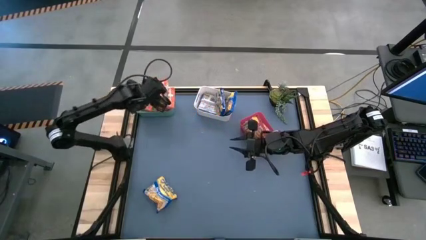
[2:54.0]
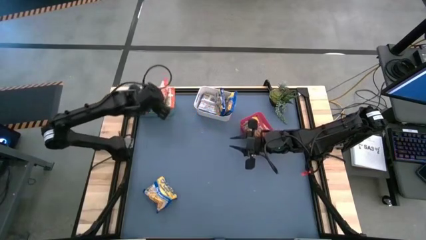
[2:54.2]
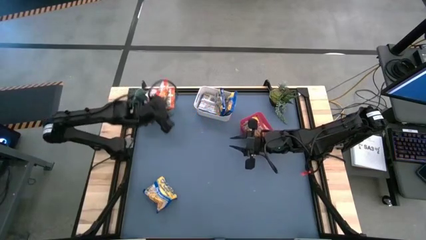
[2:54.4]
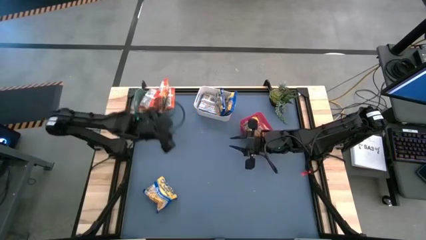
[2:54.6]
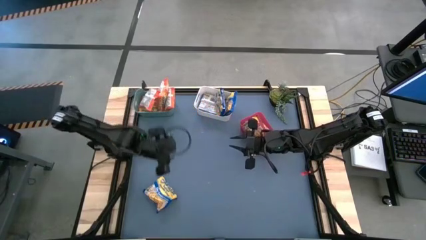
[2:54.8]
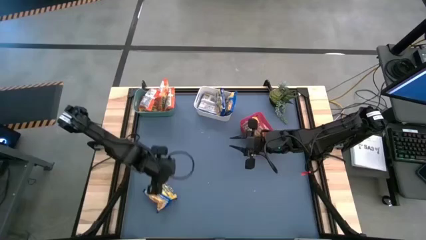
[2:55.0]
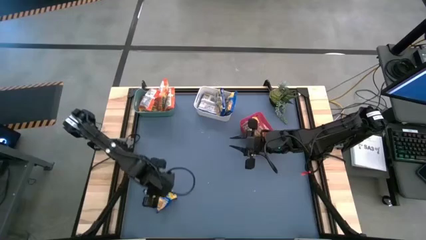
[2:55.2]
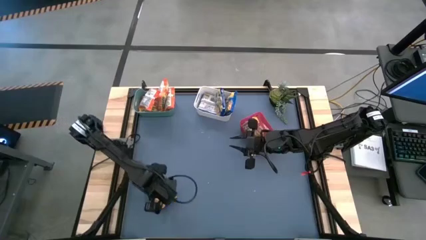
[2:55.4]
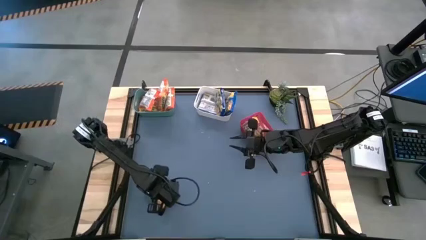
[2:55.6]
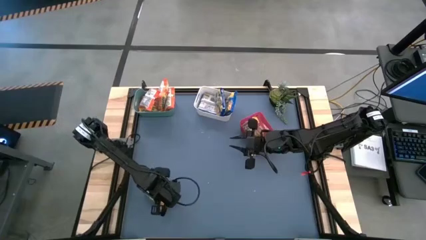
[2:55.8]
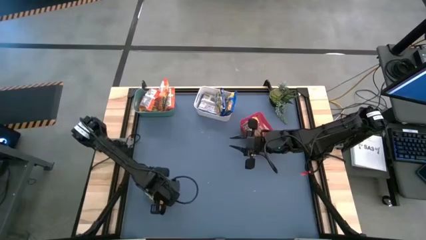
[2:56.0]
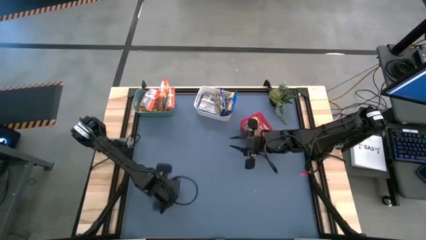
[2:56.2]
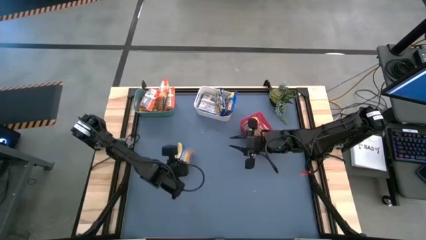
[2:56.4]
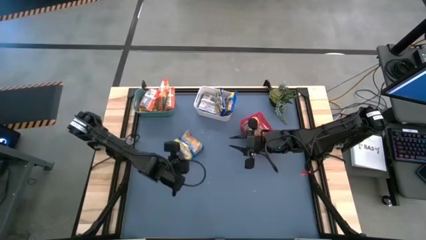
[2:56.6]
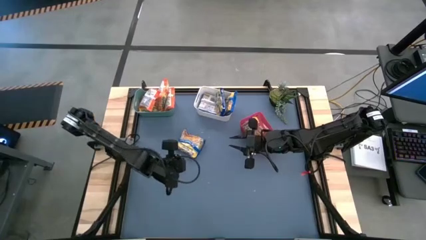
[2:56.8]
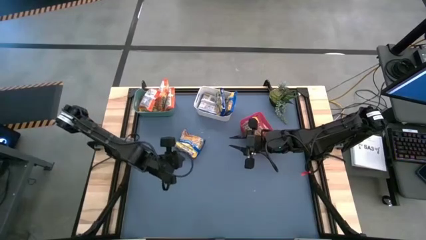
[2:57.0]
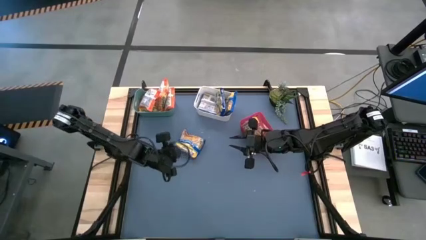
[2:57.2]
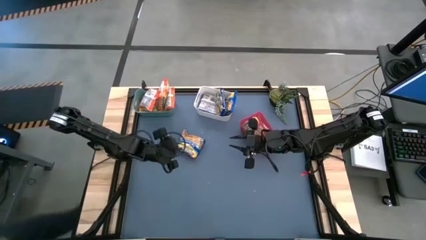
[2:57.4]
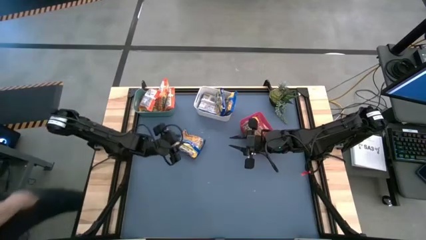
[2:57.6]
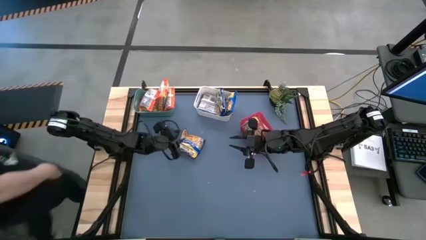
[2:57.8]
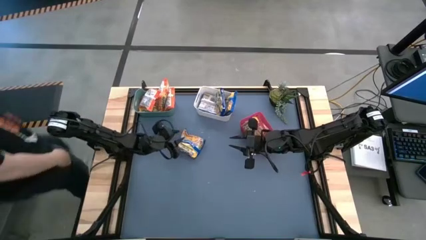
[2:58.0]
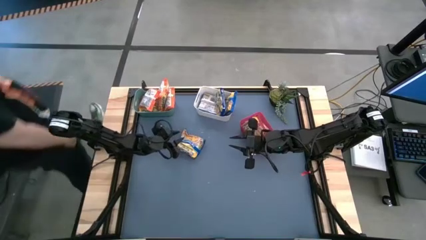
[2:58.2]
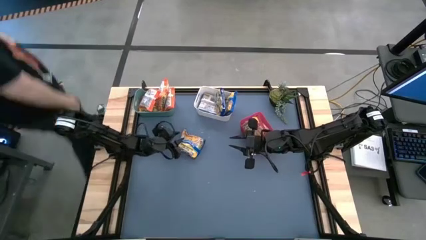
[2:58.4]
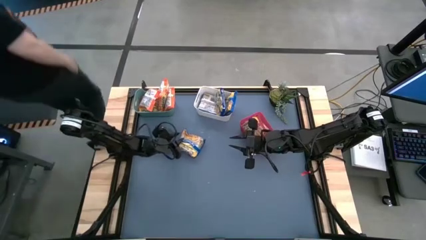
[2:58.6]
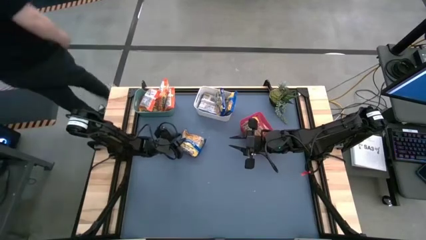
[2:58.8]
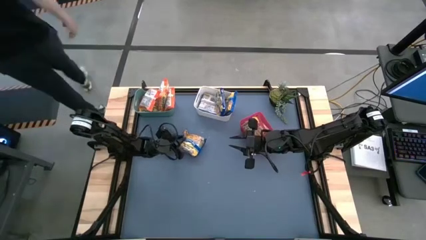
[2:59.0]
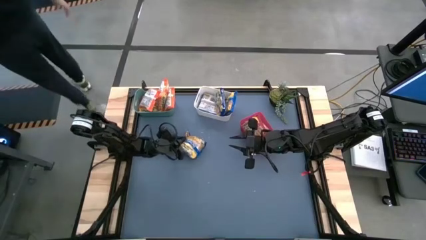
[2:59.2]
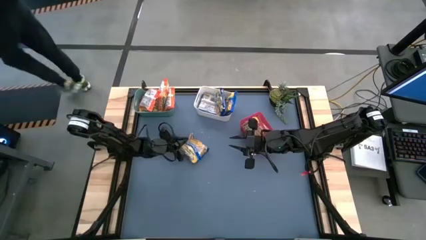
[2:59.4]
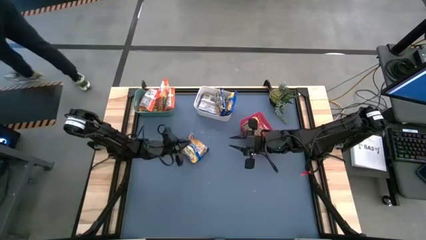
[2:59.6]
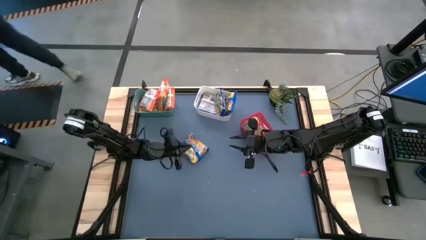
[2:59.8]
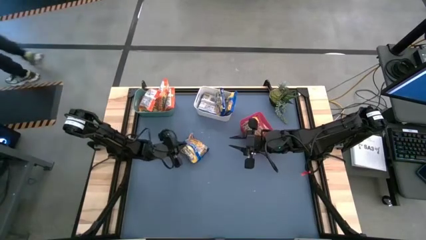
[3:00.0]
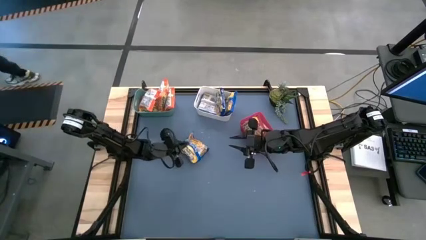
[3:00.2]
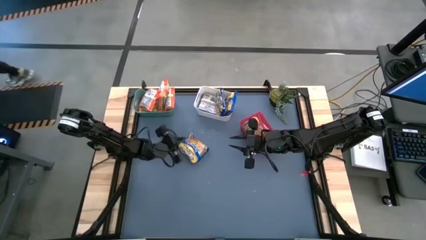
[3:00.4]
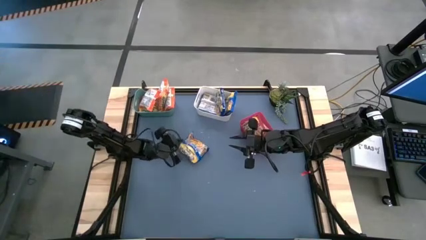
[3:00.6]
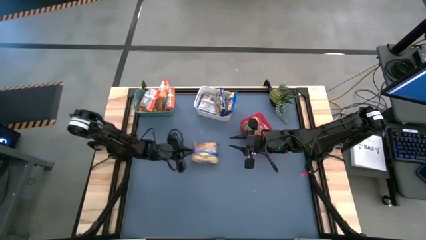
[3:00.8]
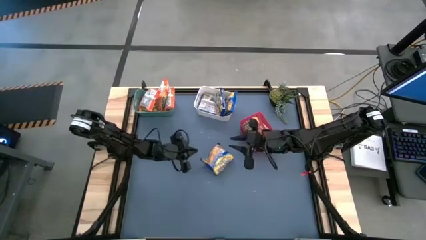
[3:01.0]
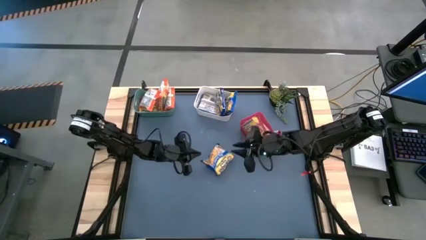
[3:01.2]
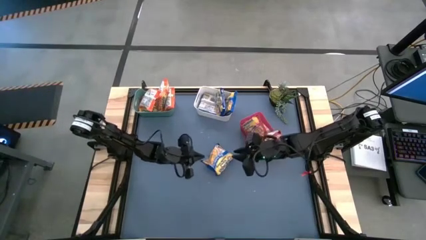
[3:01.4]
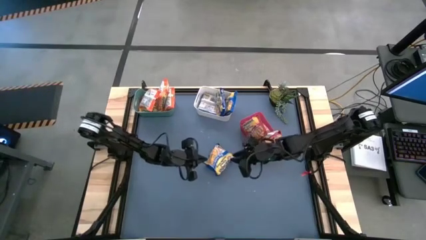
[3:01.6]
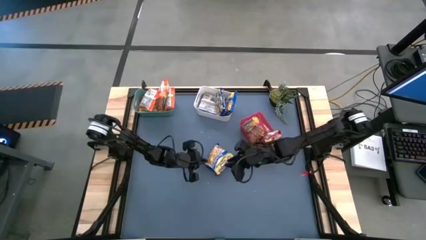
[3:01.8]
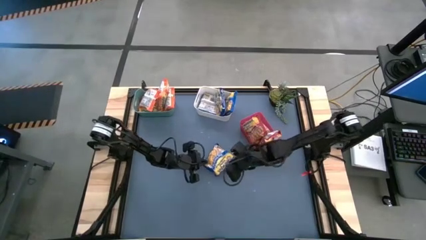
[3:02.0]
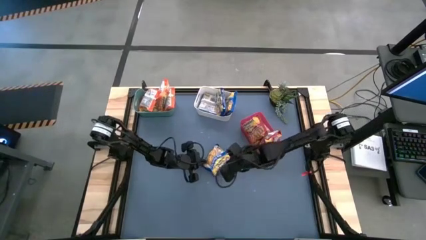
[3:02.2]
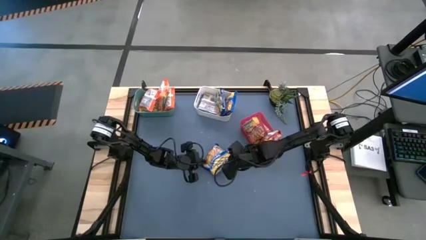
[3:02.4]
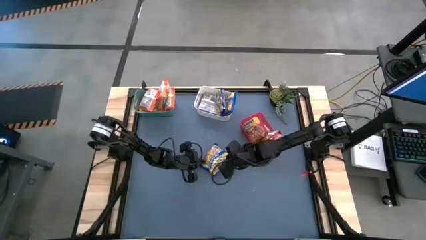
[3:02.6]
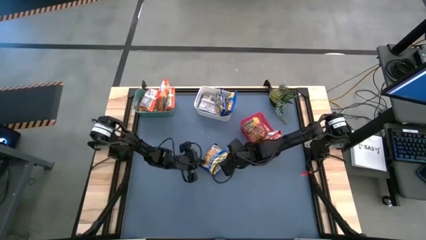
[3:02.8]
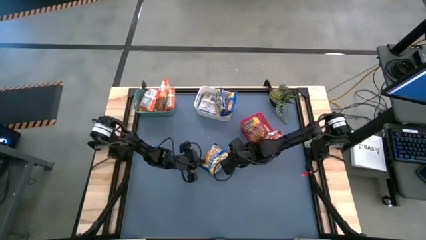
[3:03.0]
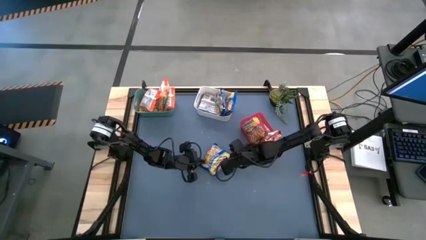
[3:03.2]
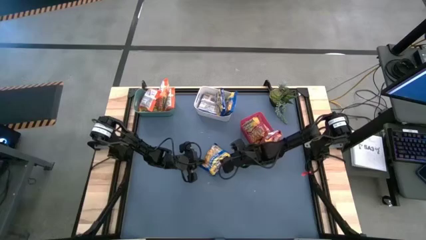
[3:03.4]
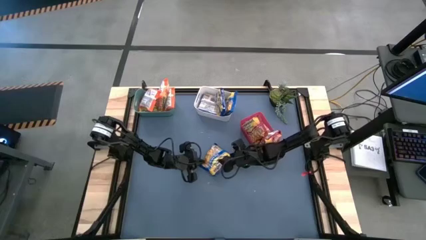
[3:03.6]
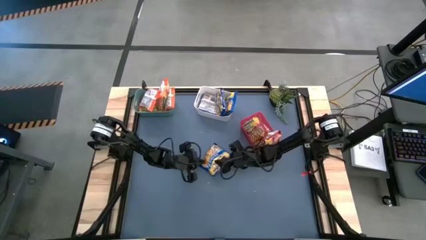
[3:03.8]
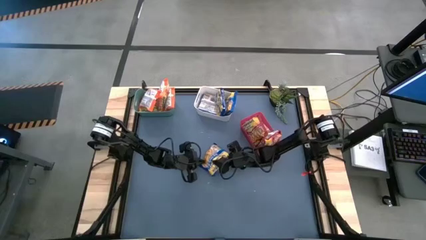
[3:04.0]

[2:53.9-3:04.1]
Task: Sort Maruchan noodles
Put the blue noodle pack into the white bin

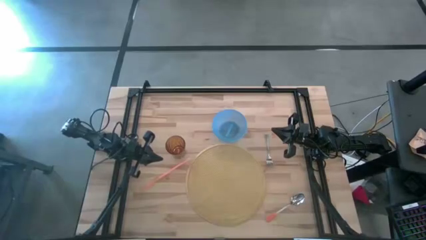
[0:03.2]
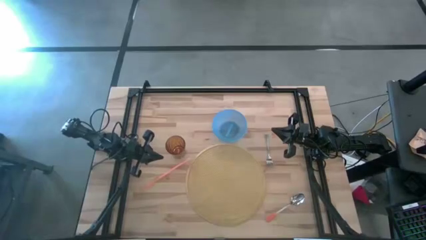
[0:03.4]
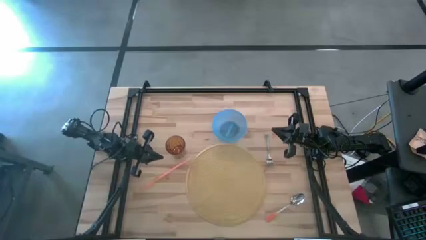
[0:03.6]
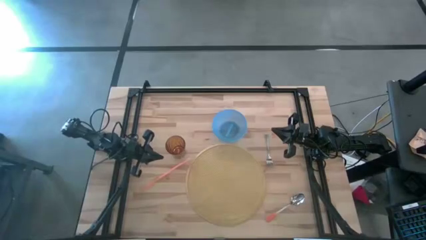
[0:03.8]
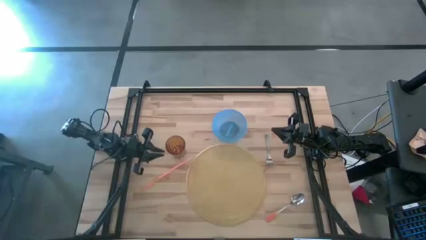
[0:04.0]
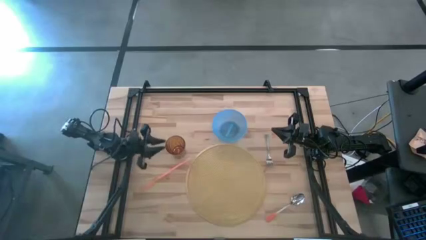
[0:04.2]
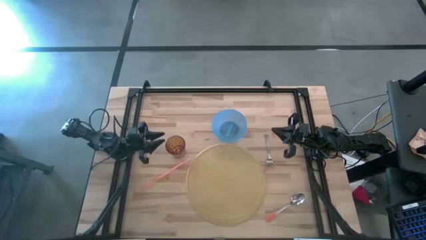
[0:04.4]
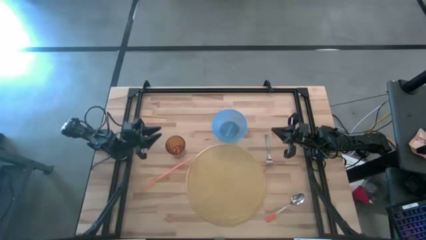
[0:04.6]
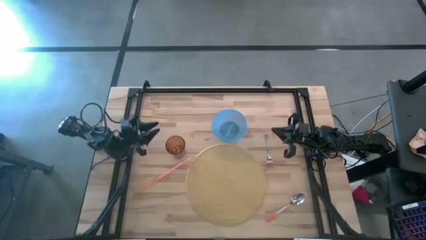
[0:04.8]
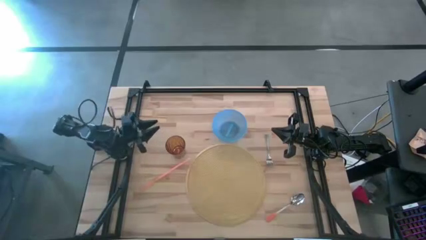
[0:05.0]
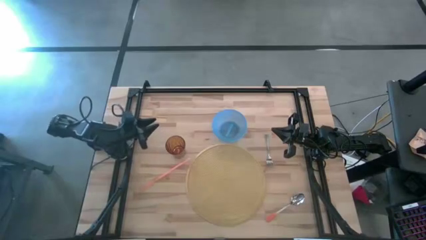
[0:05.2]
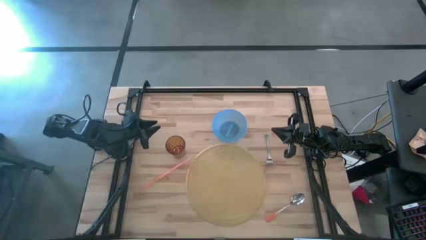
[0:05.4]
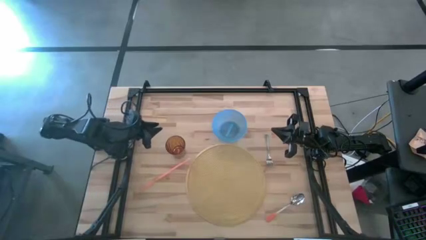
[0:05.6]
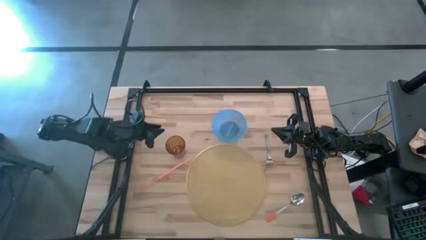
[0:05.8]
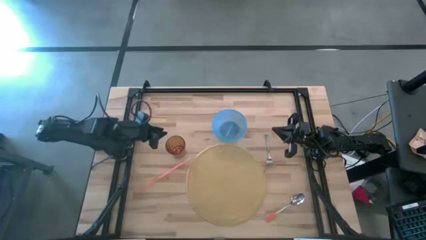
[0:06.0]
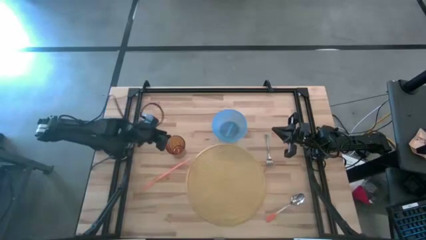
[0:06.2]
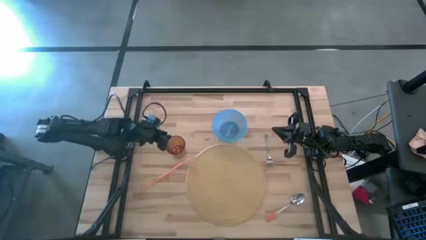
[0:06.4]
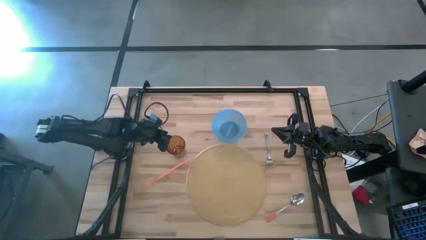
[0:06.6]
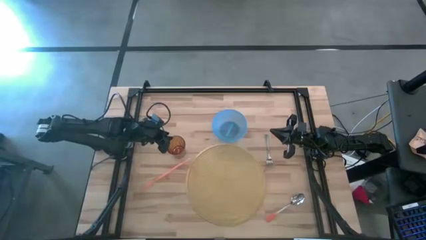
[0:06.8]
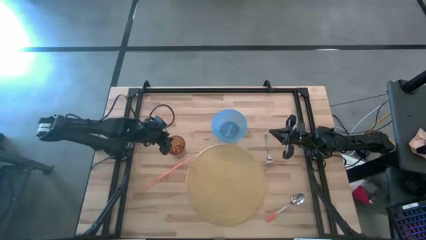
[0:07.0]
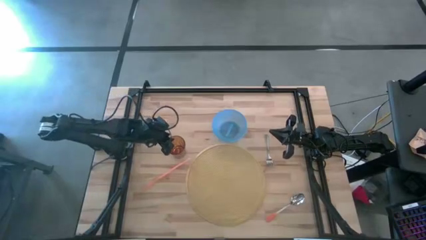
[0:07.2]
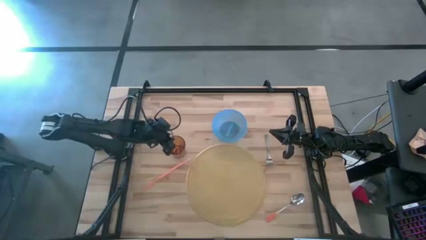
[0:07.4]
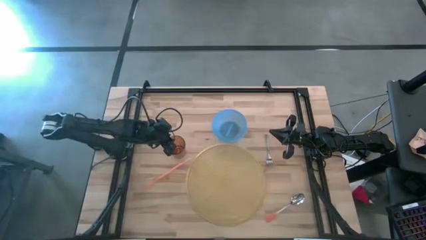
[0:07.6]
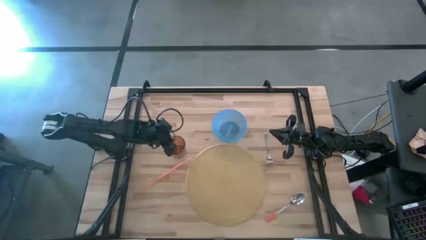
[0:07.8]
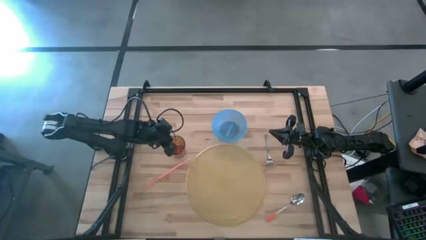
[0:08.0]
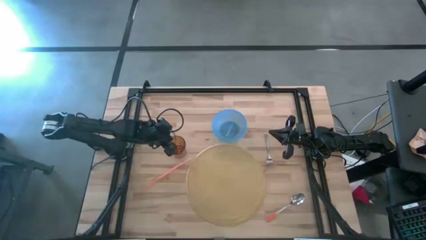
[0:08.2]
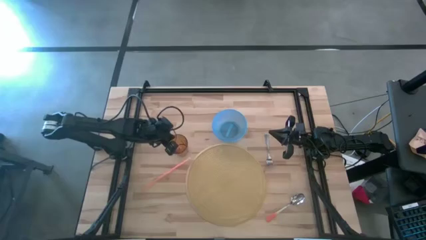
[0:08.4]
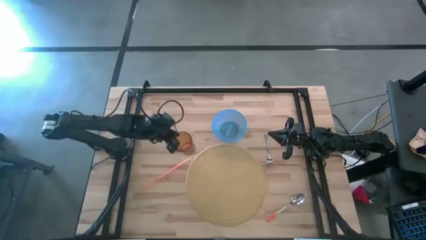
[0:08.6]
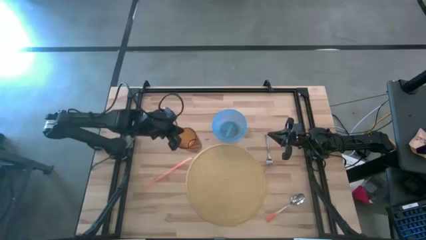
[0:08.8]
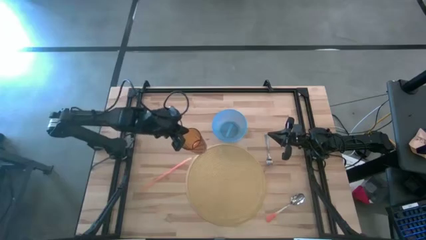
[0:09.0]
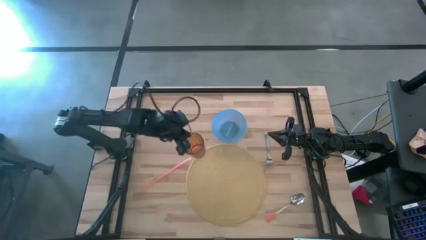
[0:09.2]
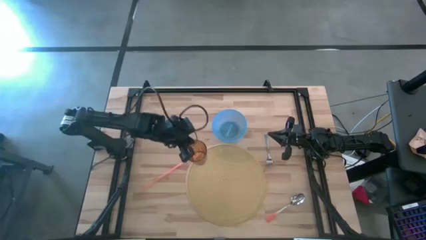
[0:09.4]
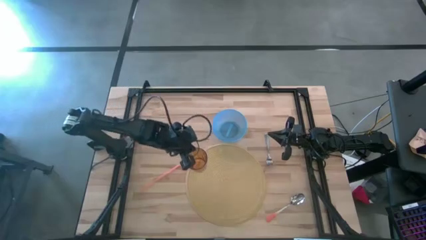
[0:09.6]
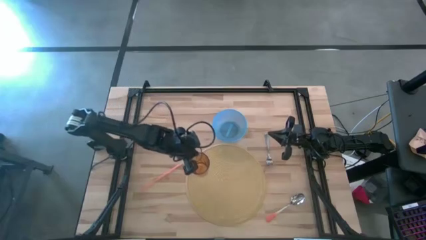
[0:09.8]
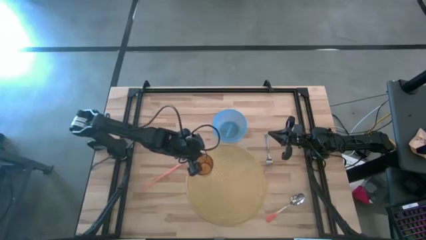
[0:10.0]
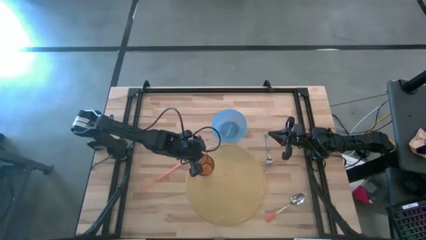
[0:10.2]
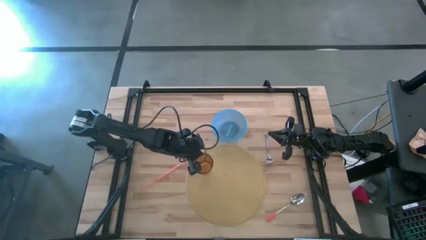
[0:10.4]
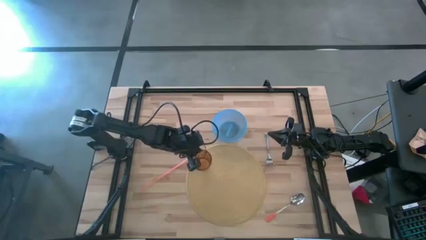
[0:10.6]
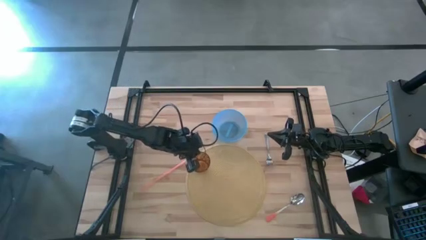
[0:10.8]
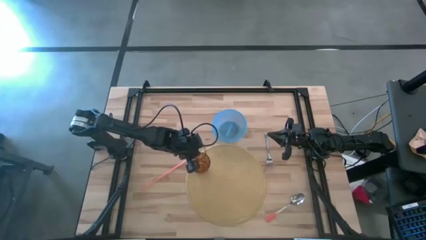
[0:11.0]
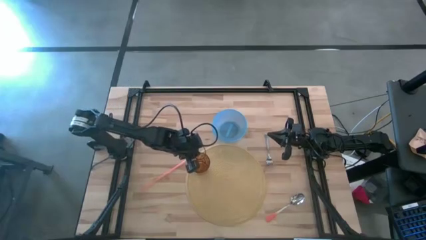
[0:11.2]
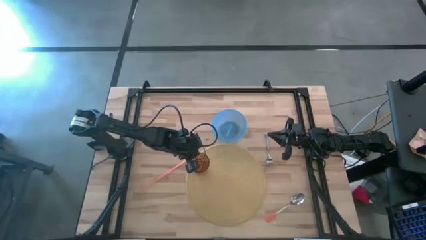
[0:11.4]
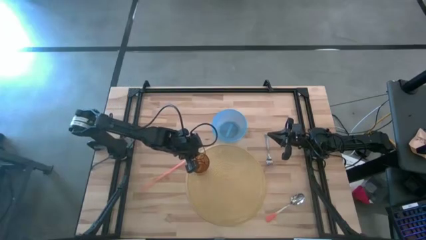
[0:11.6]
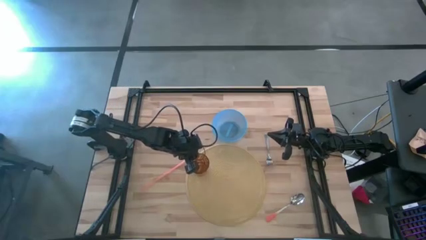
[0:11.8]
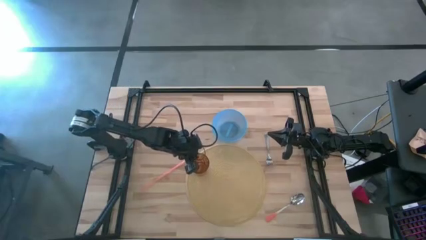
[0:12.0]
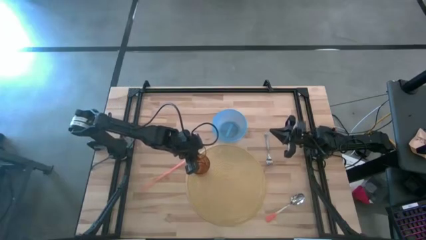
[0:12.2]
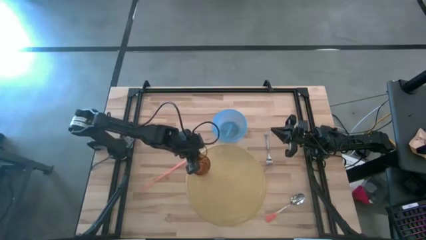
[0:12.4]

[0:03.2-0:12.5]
Task: Pick & Place Utensil
Put the brown cup on the brown mat
